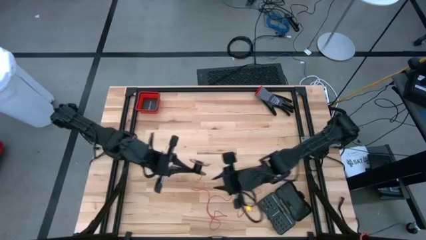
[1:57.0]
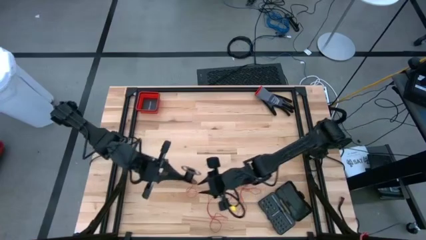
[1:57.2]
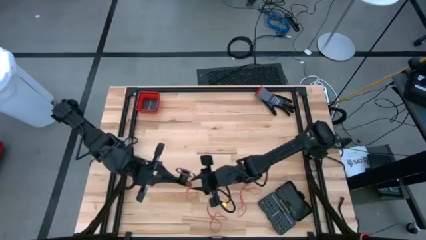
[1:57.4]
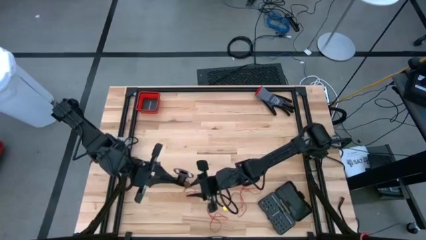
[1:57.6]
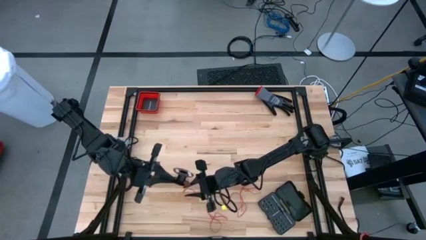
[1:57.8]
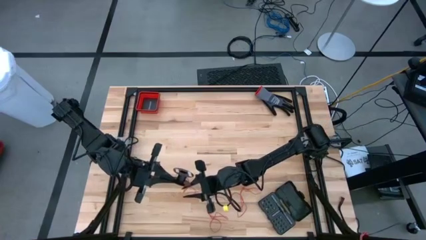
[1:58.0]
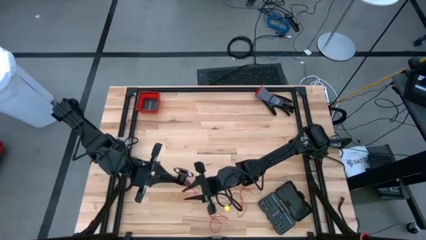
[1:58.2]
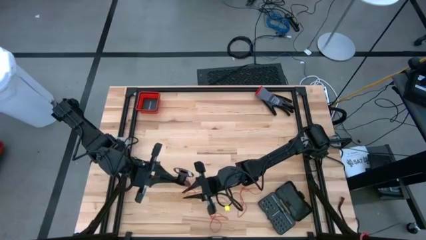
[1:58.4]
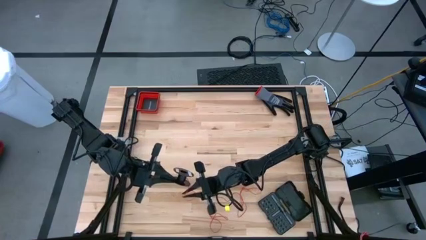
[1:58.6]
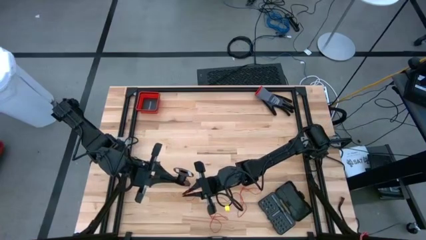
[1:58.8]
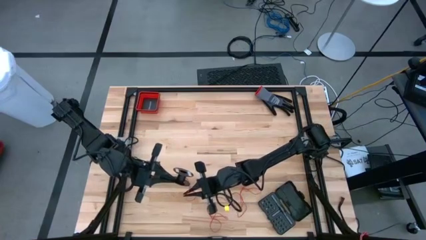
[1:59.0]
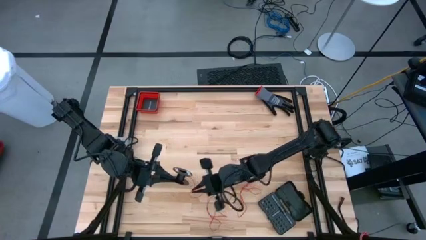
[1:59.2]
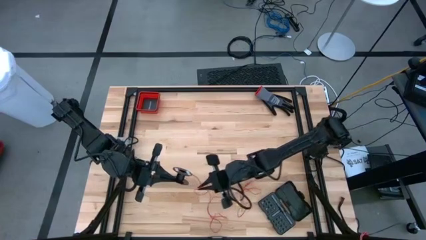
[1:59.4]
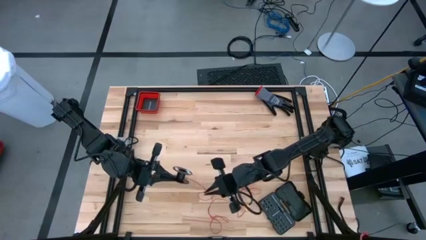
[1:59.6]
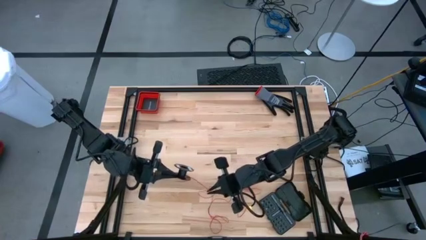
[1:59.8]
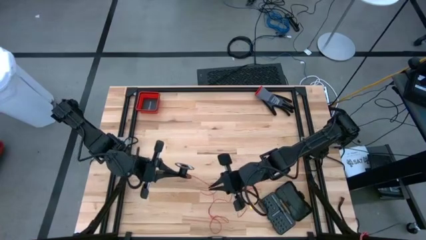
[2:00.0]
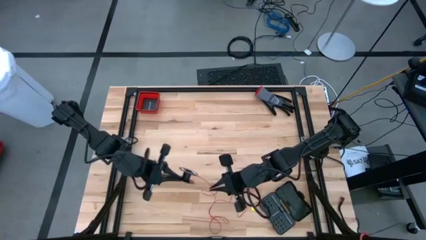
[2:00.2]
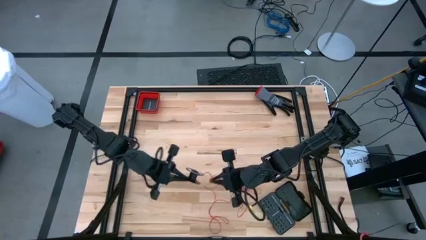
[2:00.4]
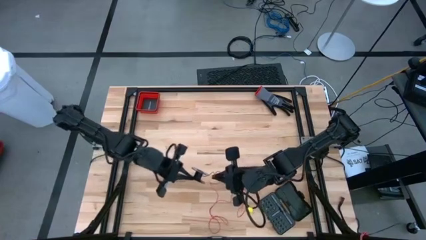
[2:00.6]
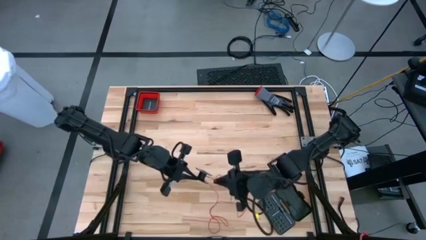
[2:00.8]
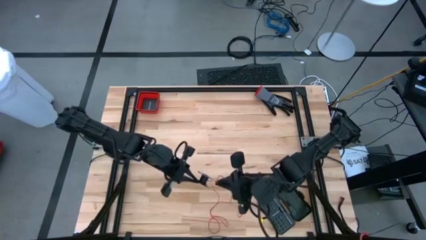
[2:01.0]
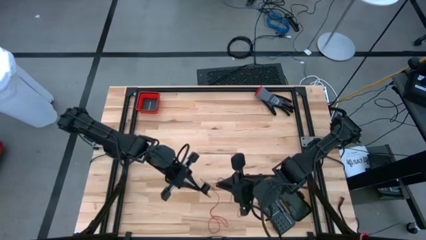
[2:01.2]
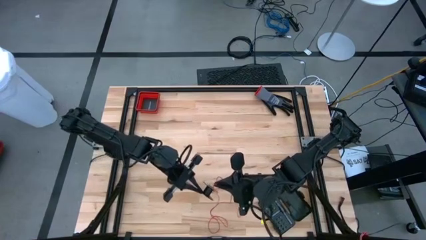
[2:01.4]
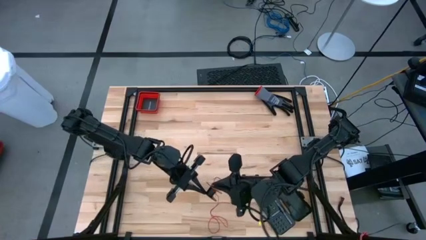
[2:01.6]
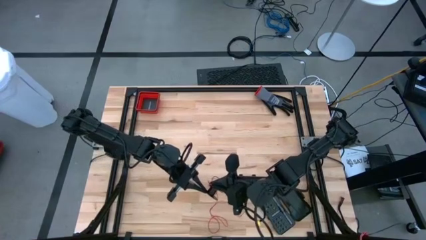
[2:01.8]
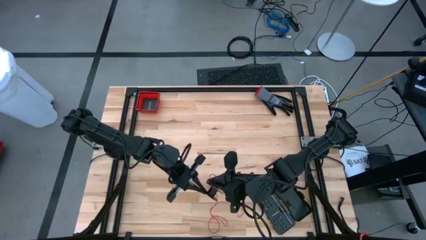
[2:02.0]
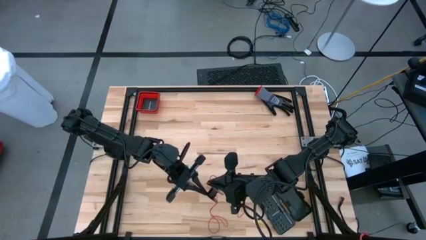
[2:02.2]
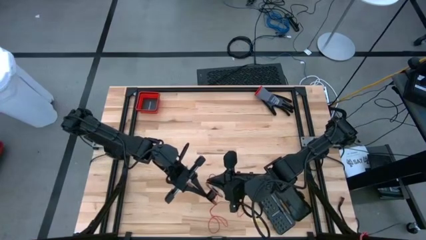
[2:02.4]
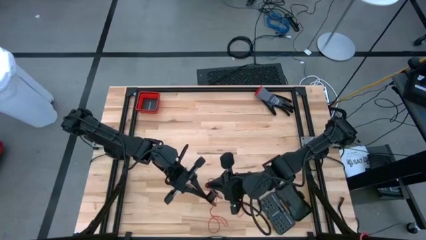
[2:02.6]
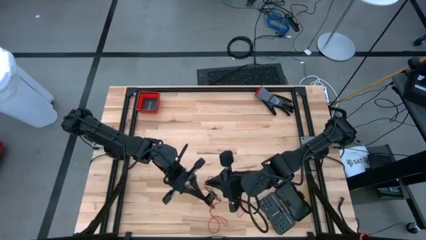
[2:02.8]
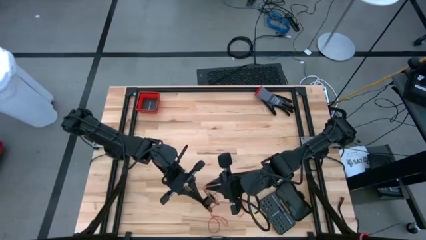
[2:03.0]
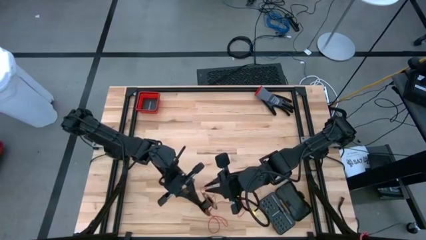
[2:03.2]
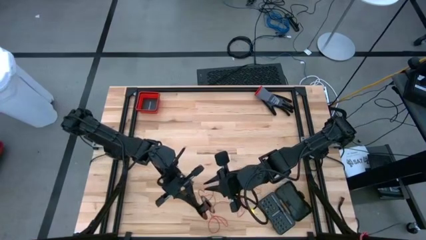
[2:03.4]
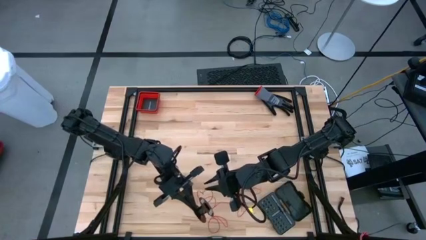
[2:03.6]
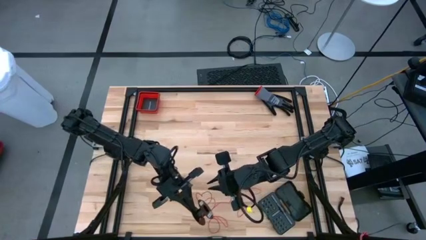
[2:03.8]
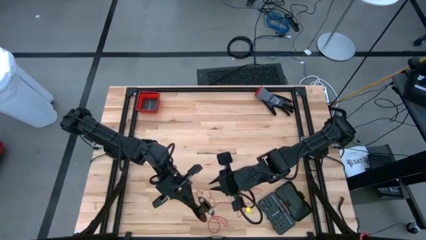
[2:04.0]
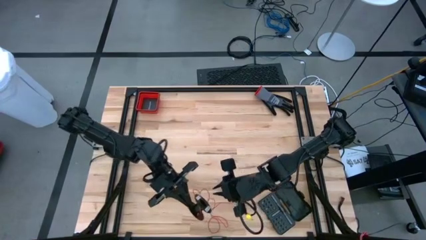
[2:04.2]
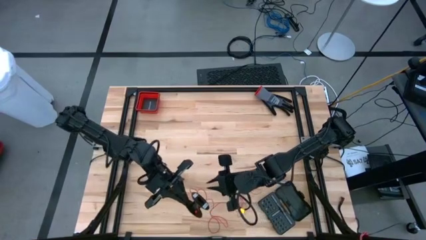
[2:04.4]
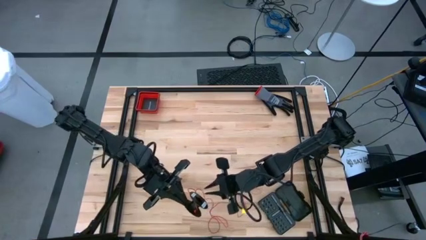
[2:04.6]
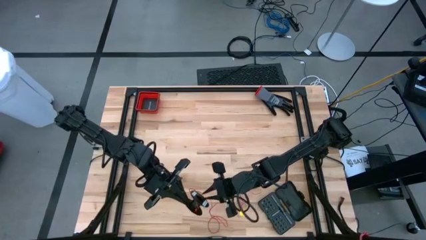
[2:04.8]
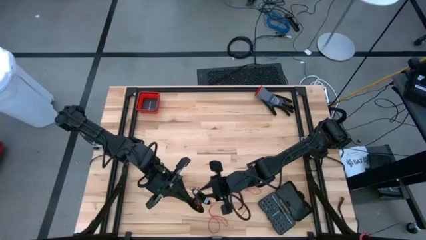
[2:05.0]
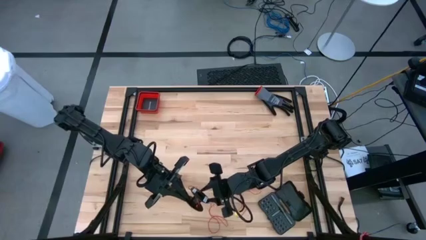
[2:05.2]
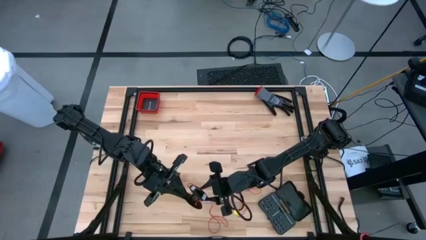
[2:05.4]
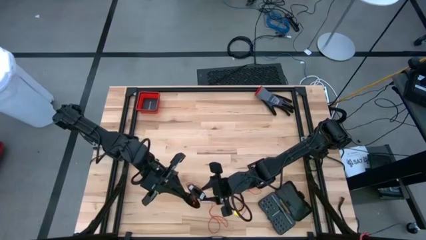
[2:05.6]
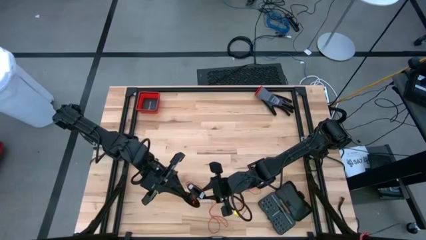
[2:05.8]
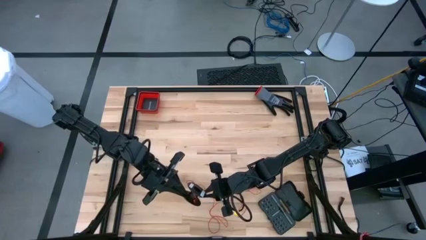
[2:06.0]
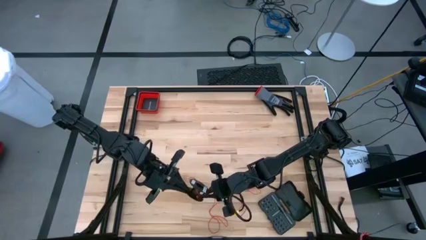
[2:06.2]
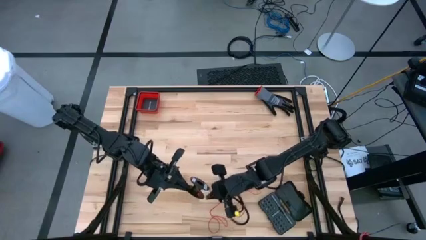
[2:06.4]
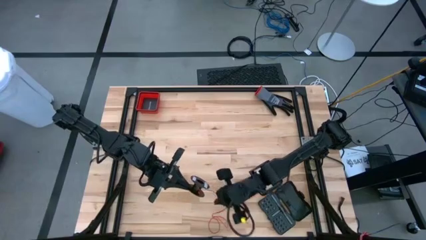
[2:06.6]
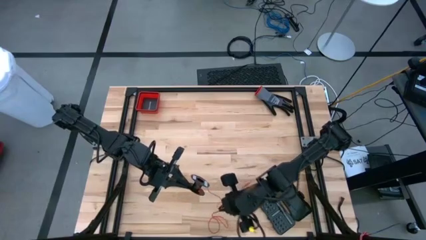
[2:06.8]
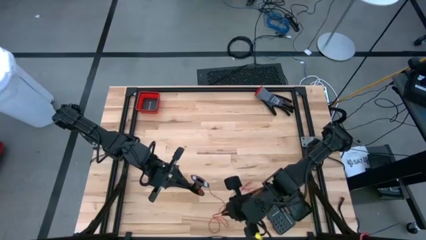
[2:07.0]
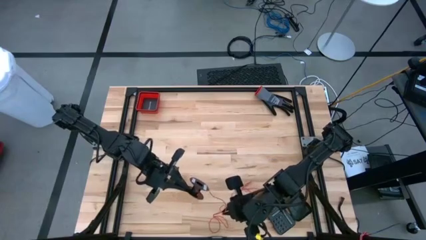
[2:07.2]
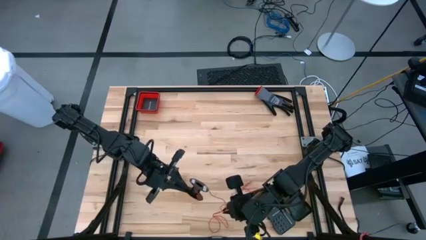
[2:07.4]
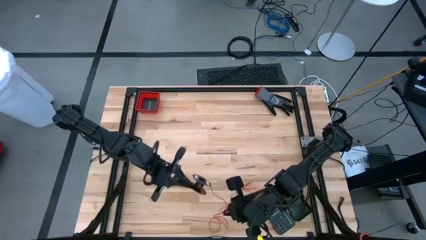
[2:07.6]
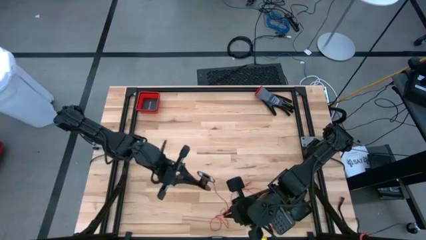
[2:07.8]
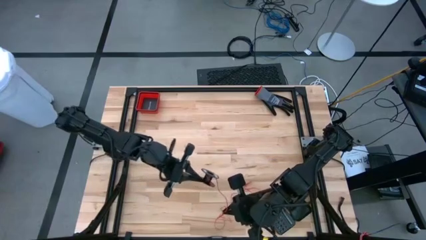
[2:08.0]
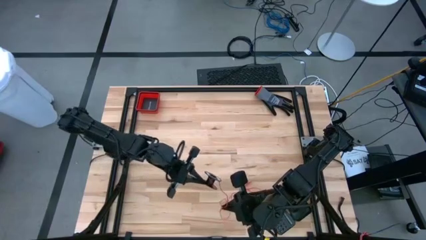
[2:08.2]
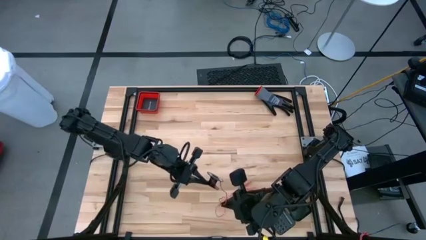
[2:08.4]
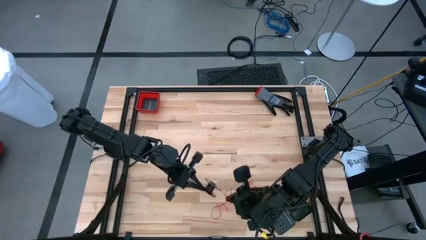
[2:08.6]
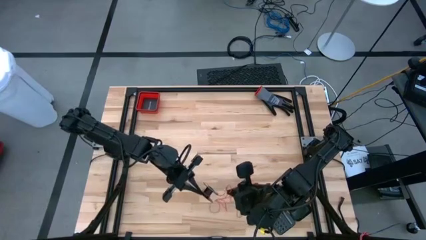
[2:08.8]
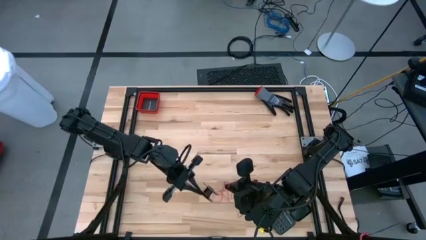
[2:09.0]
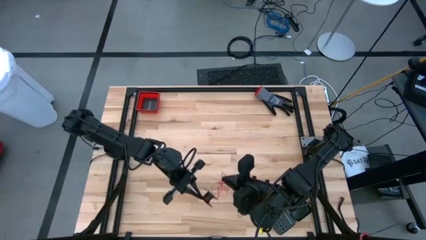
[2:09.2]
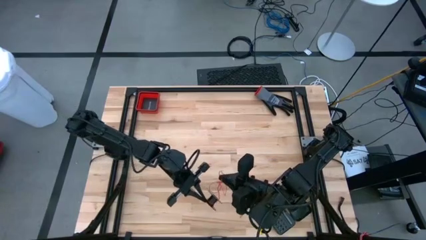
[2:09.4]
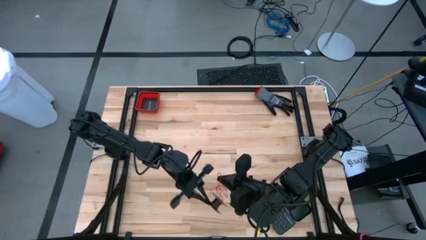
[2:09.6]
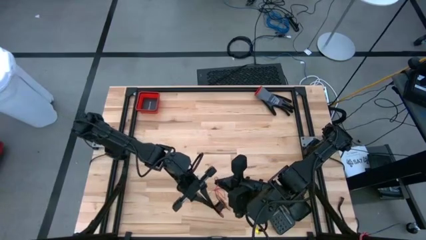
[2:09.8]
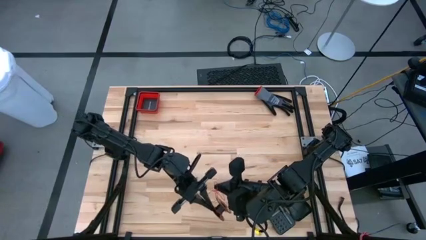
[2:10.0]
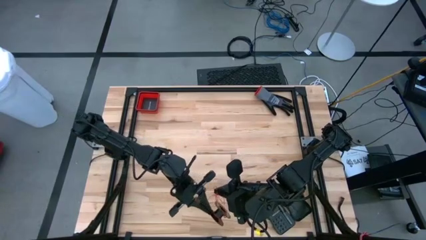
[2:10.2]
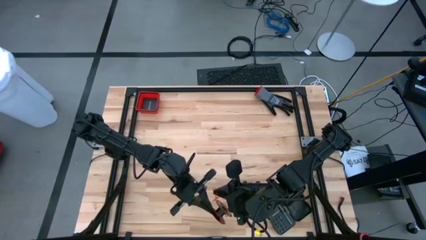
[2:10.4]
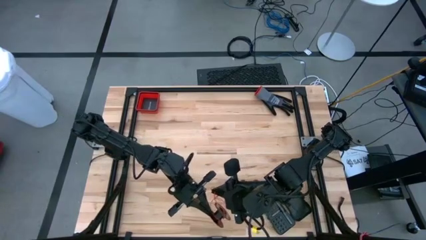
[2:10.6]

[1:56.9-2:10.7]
Task: Coil cords
Coil the red wire onto the spool
